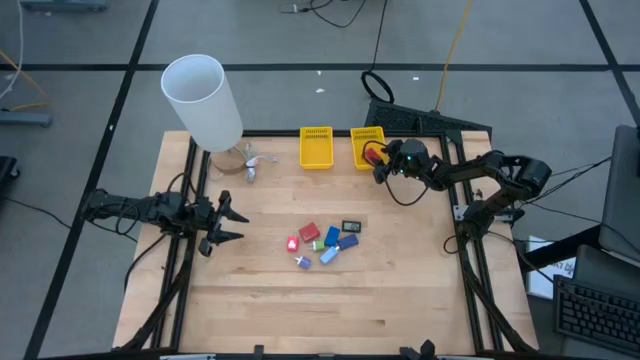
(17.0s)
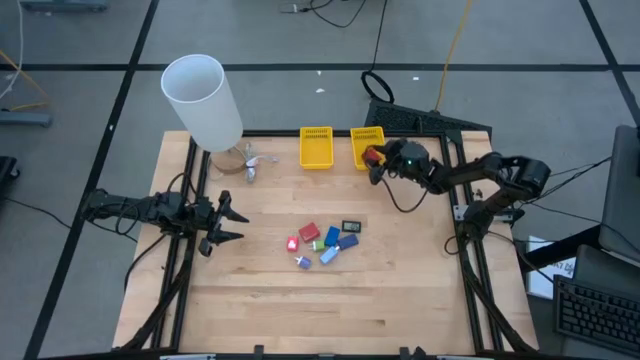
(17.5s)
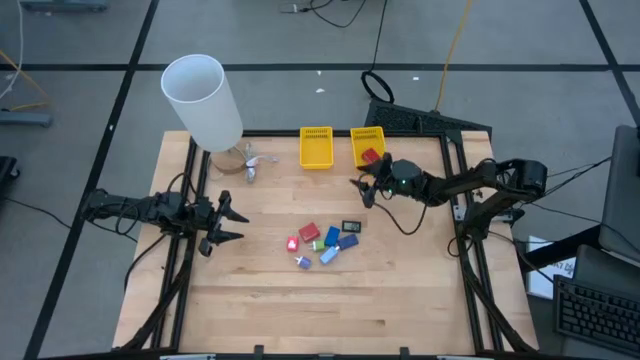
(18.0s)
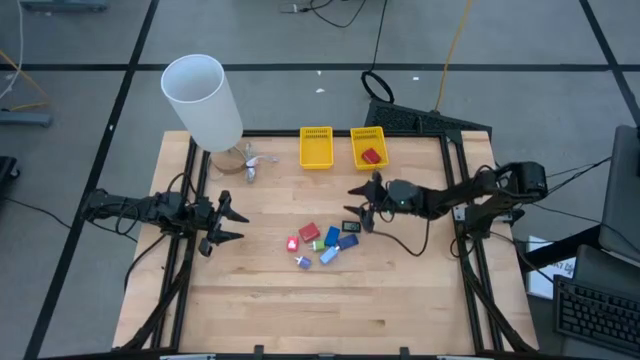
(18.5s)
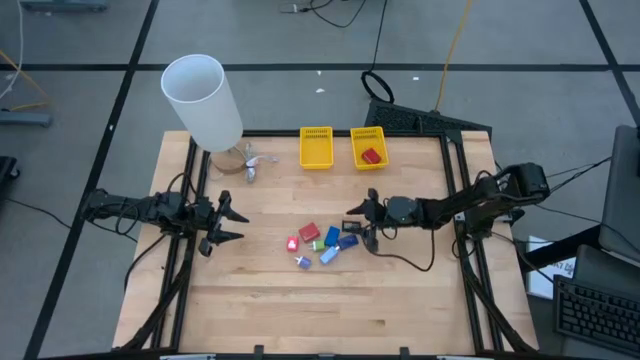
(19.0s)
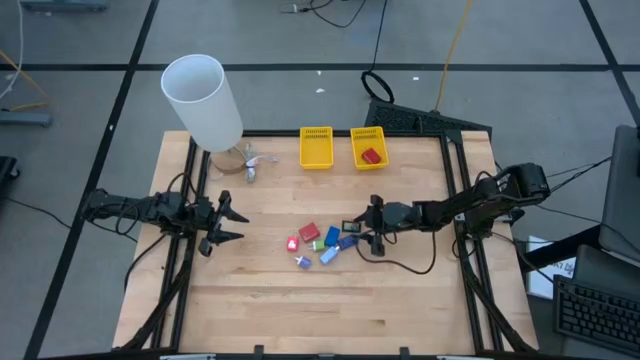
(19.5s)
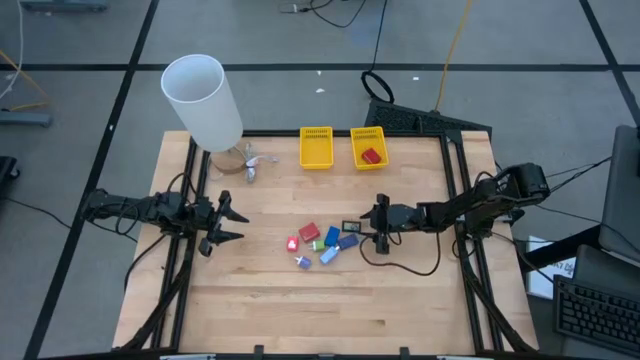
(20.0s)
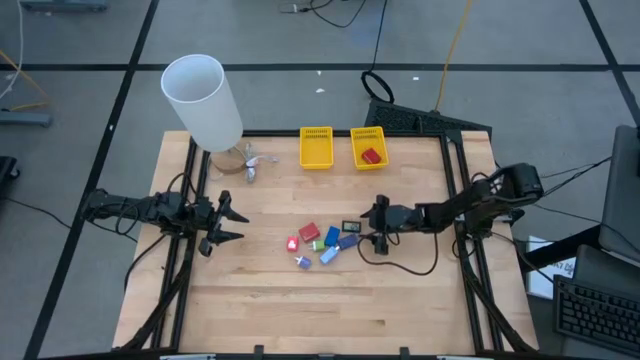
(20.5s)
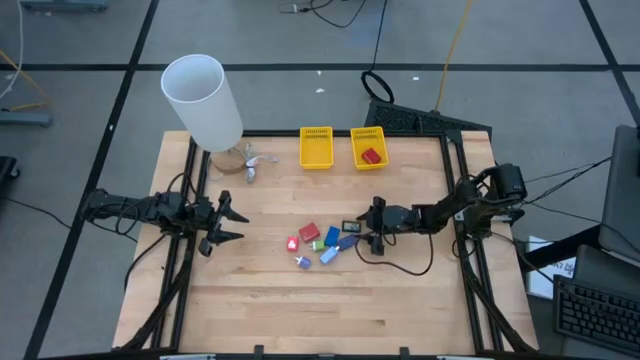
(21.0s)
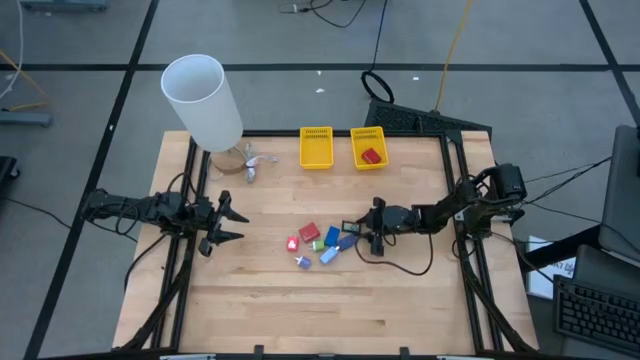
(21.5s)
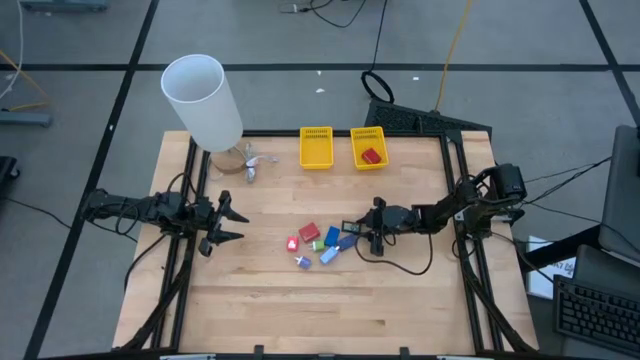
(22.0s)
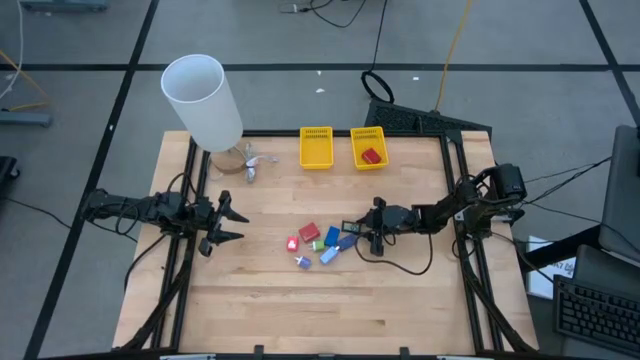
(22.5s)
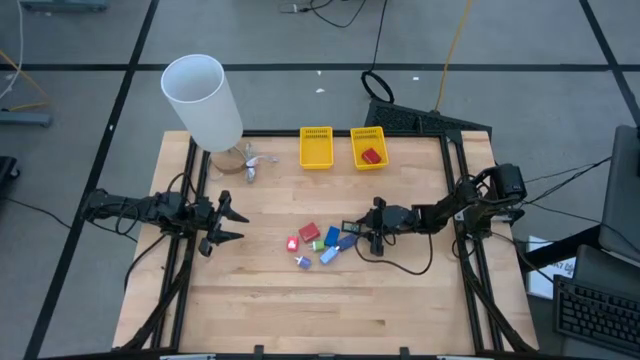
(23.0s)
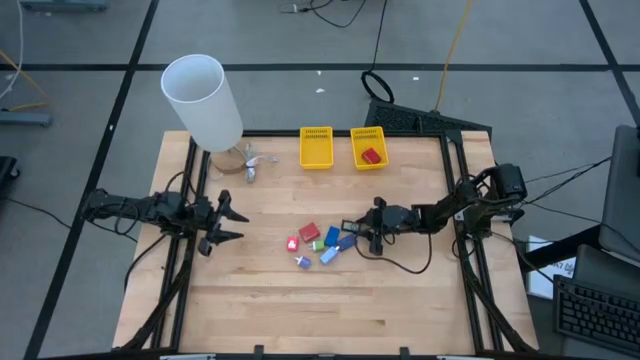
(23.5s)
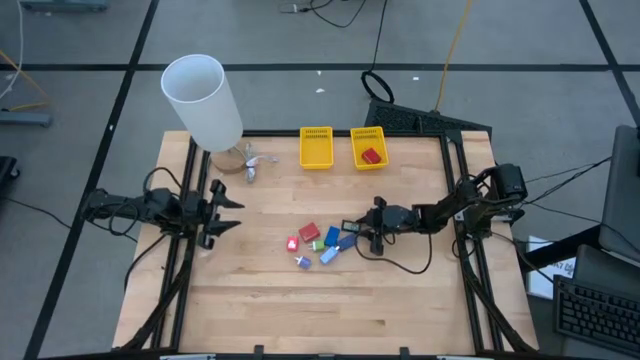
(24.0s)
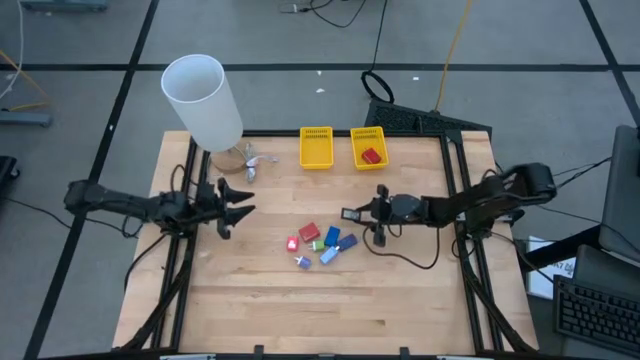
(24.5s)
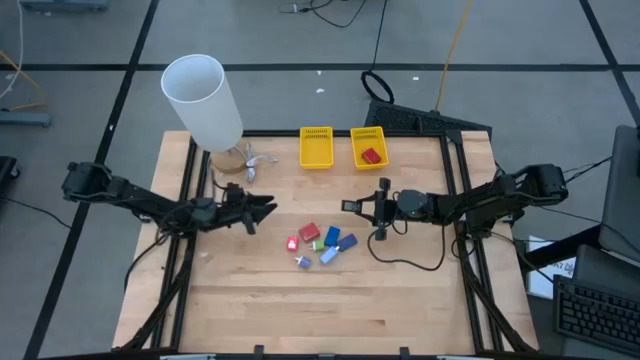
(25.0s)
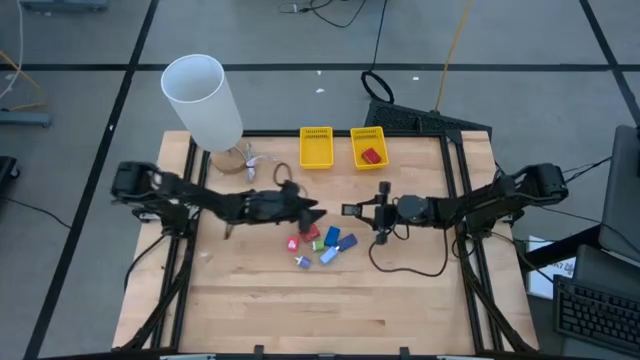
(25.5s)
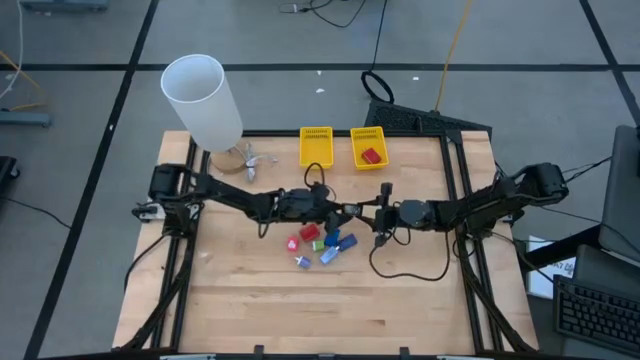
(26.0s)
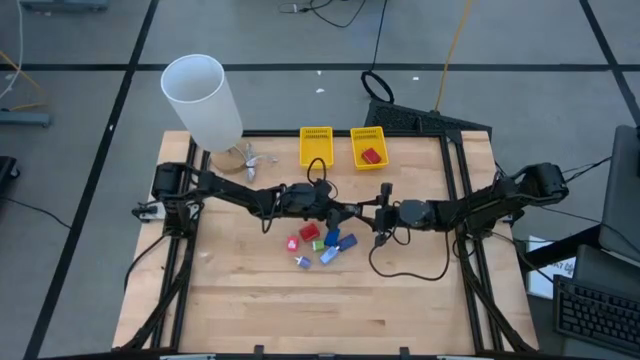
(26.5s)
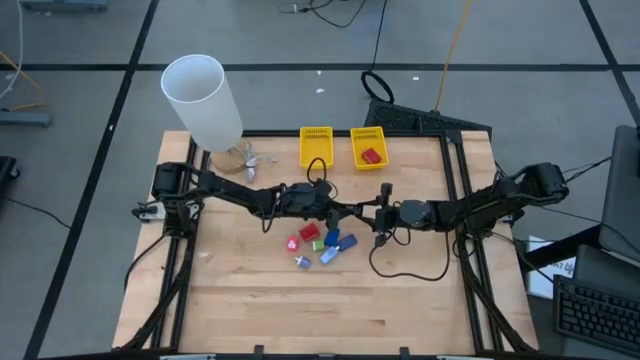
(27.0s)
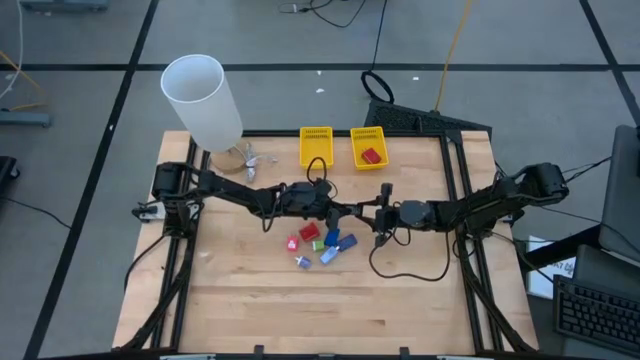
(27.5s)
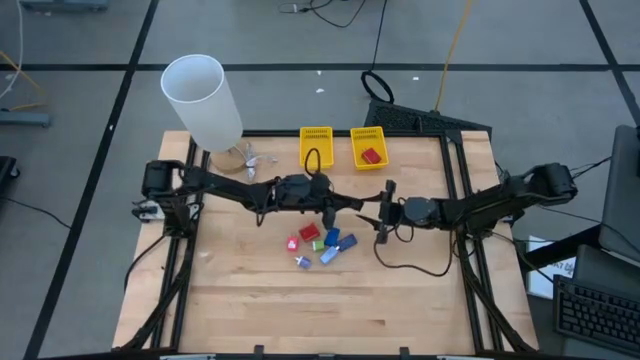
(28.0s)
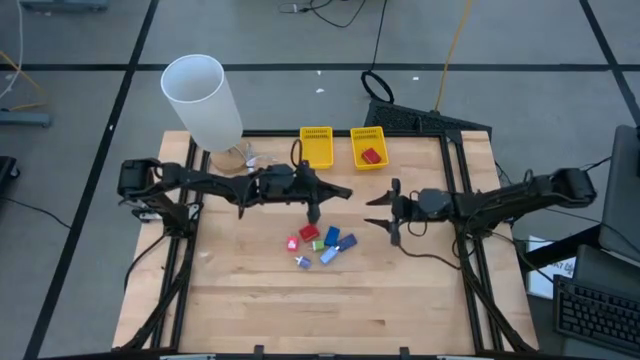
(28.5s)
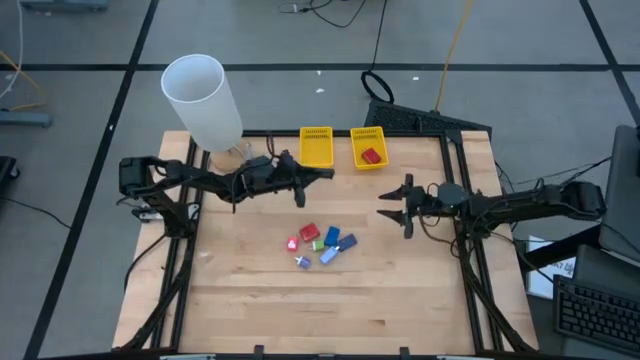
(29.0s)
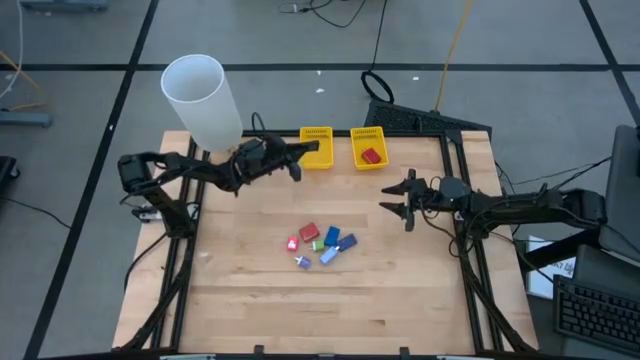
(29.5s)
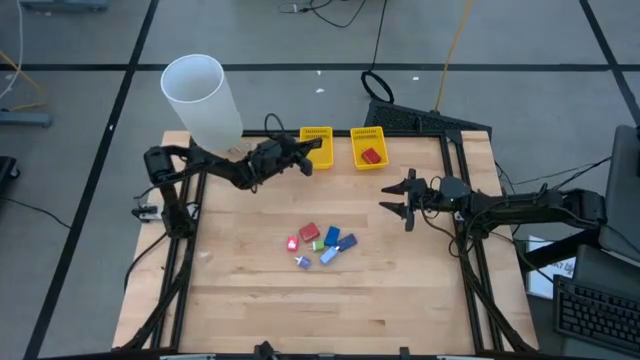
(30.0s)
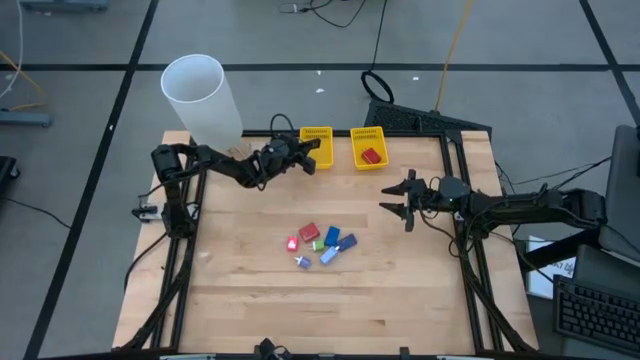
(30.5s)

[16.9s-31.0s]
Task: Pick & Place Office items
Put the black digital clock into the left yellow bin

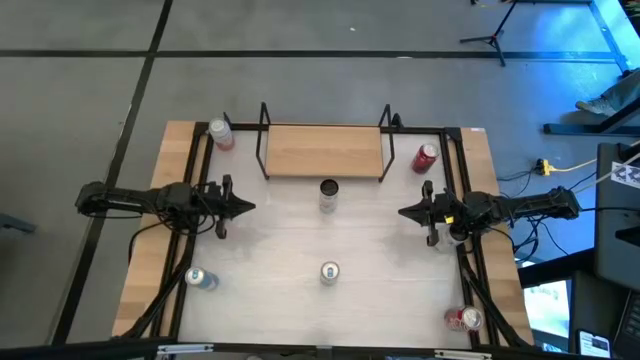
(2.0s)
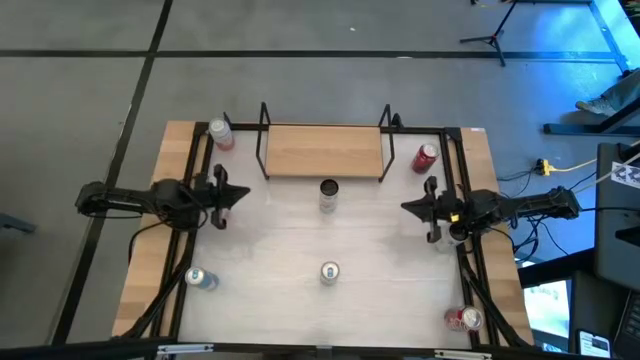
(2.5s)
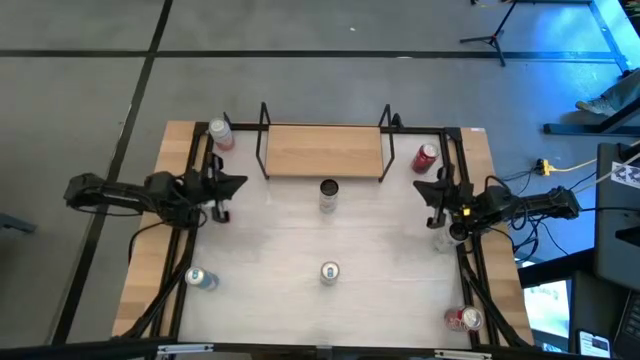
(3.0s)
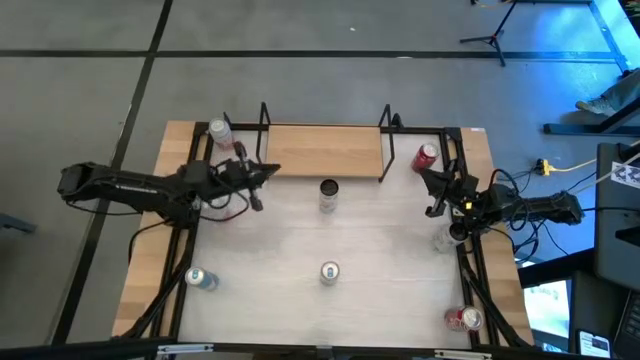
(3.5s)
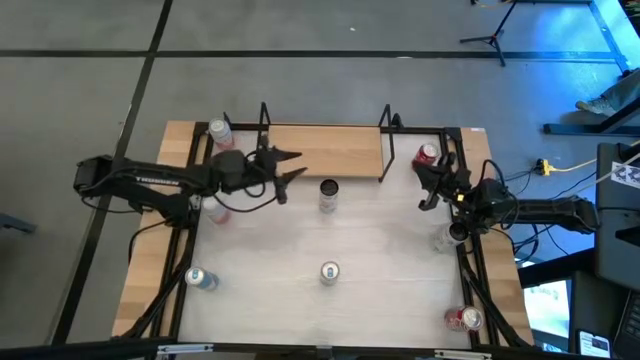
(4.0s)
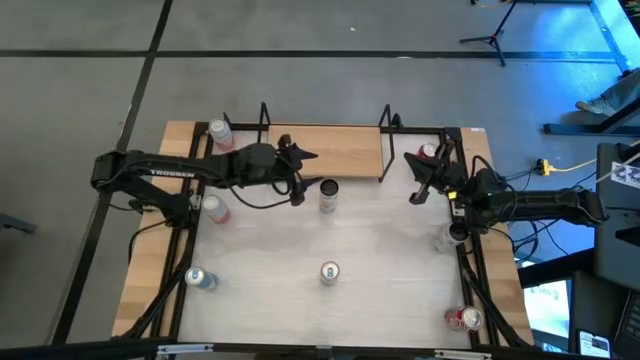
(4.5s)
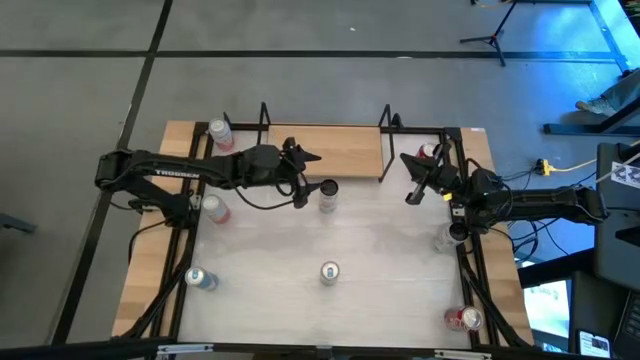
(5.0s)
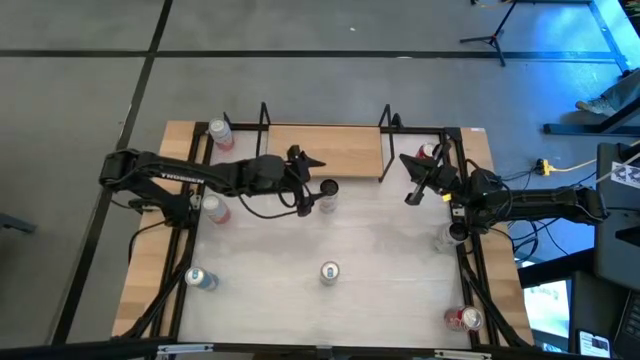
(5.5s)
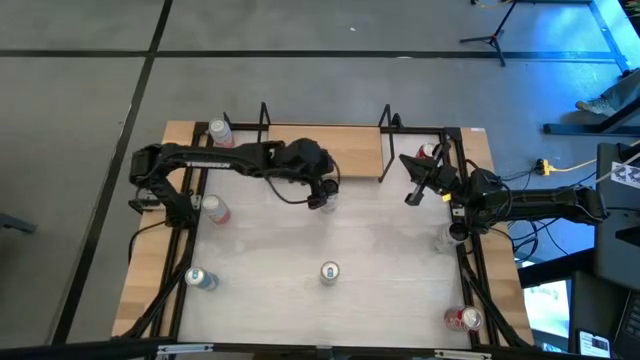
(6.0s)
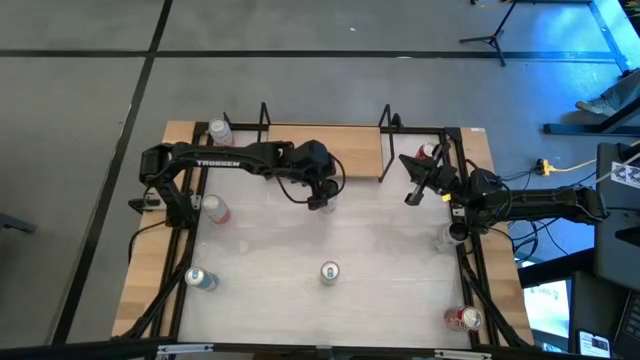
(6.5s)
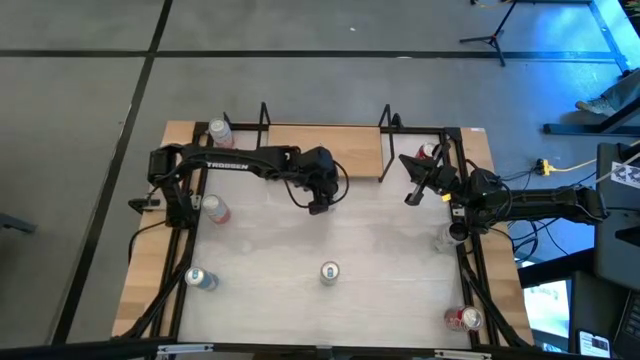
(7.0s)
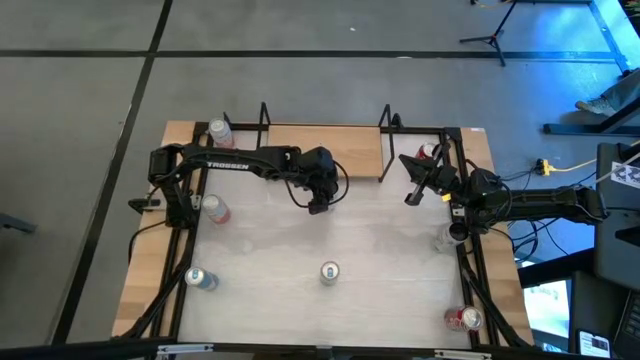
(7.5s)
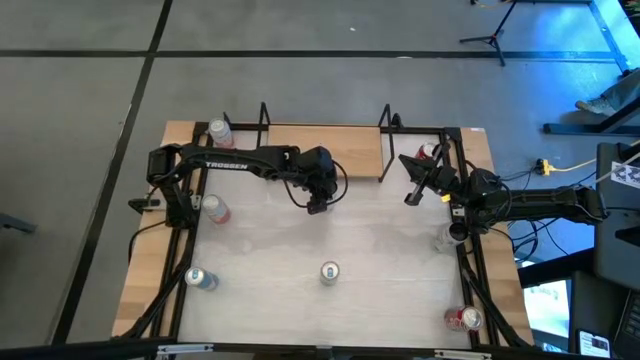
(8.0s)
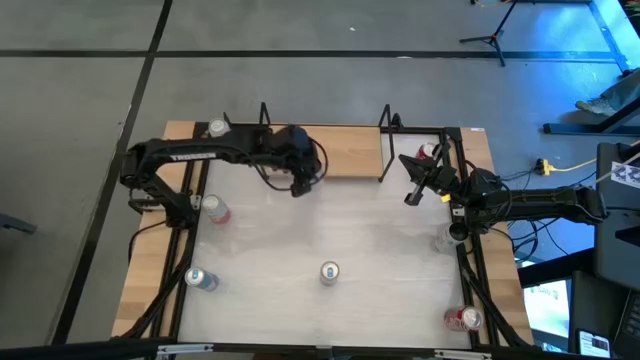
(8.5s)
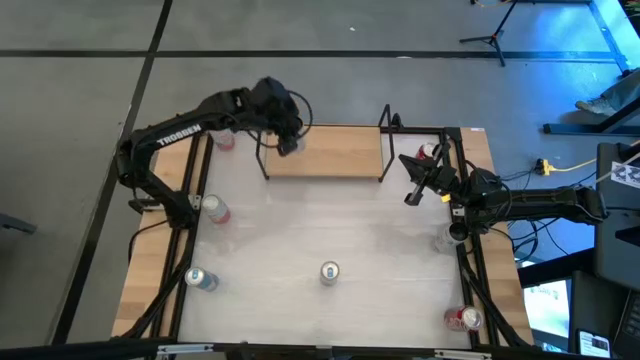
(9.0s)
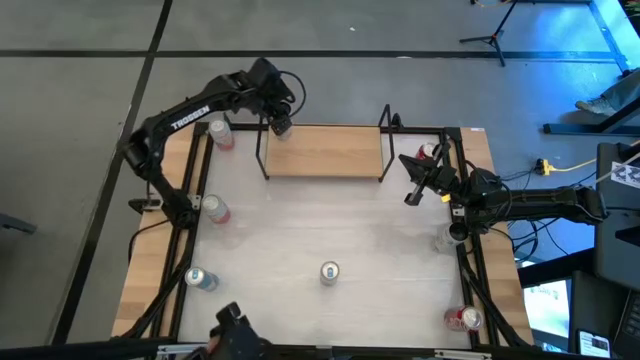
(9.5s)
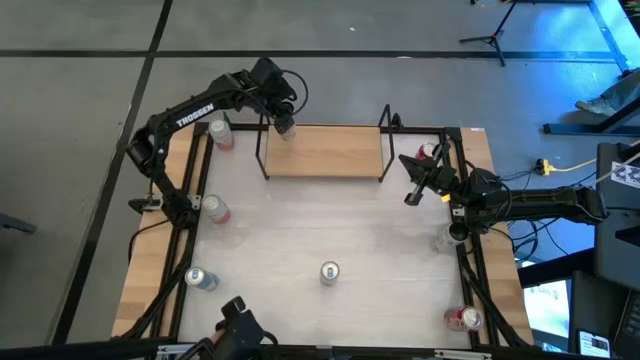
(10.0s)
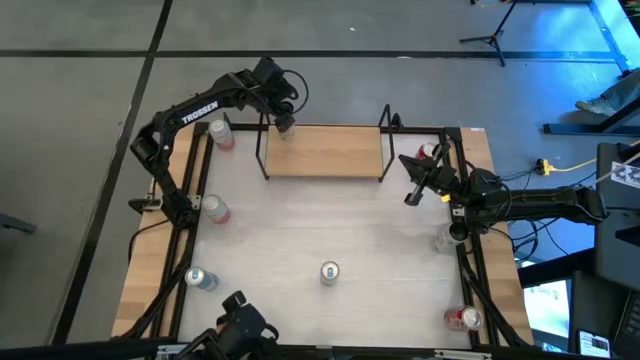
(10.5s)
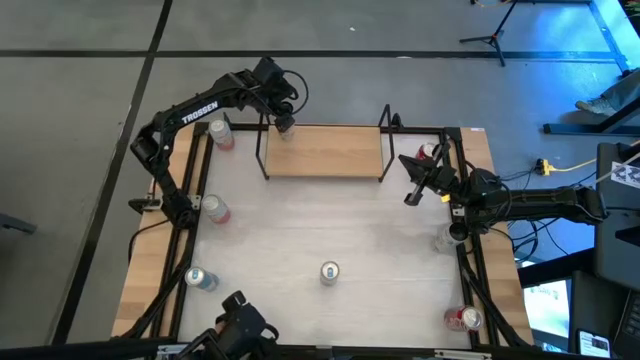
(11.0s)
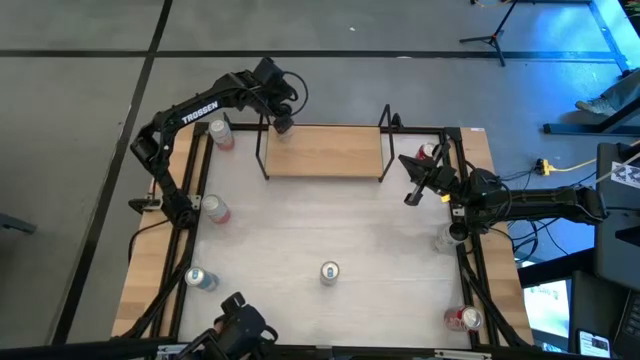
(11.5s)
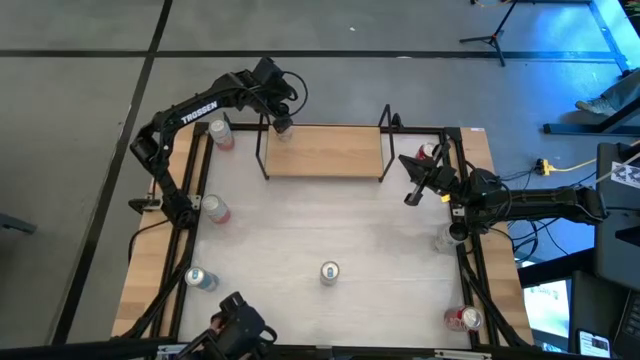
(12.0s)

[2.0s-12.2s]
Task: Place canned beverage on shelf
Put the top white-pink soda can on the shelf
